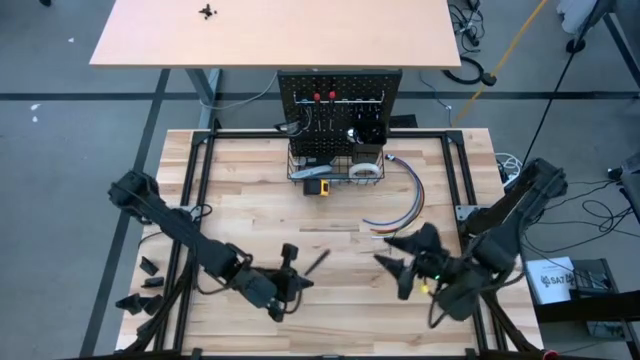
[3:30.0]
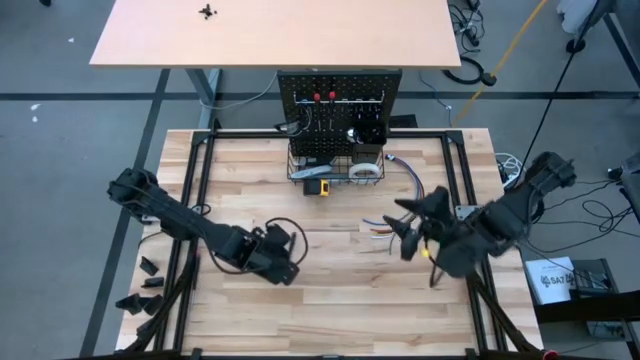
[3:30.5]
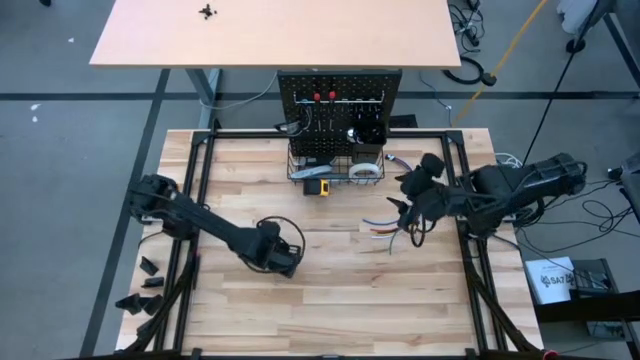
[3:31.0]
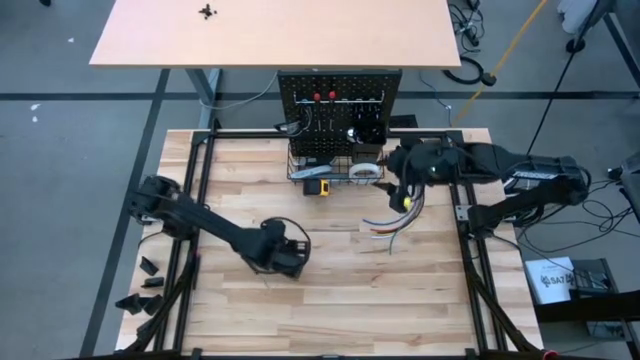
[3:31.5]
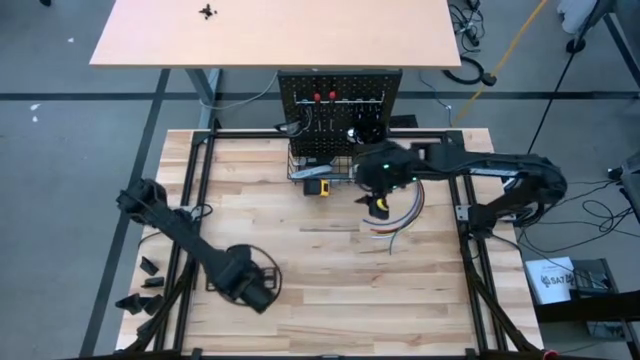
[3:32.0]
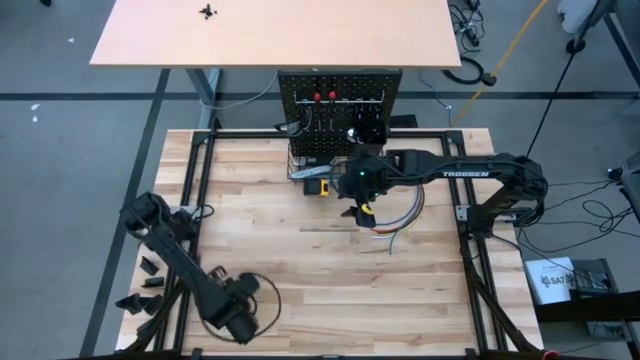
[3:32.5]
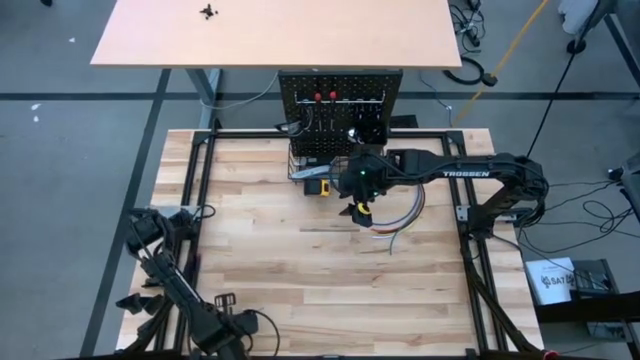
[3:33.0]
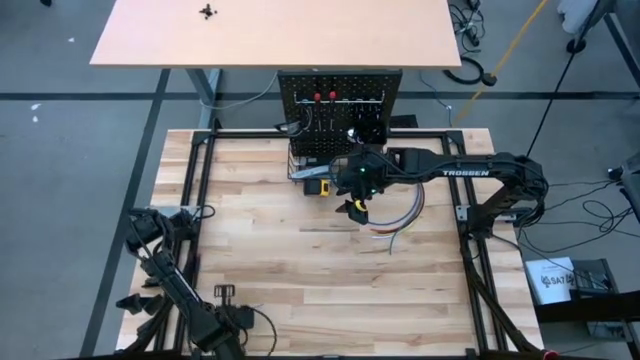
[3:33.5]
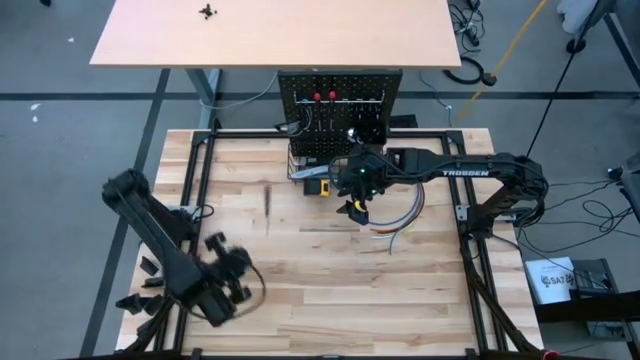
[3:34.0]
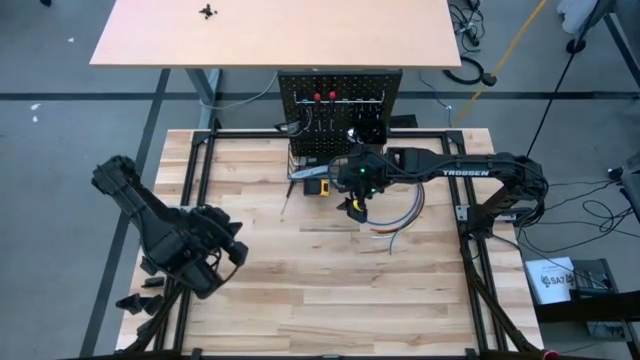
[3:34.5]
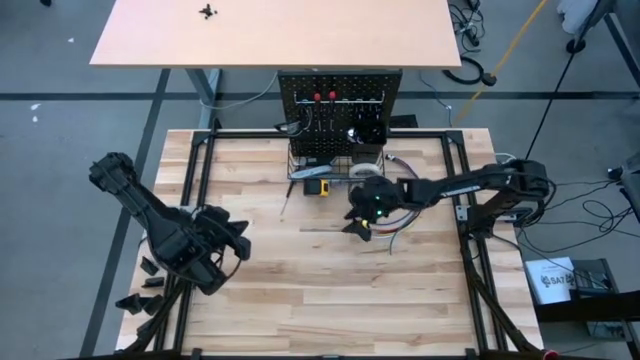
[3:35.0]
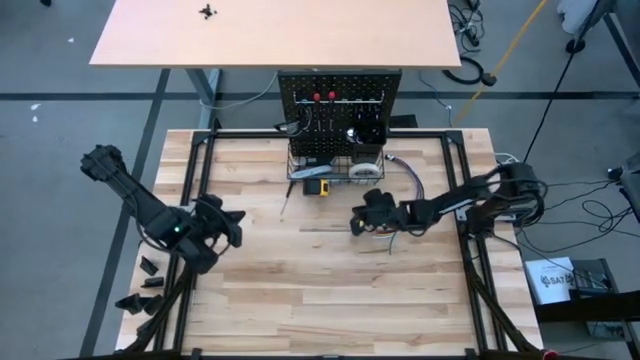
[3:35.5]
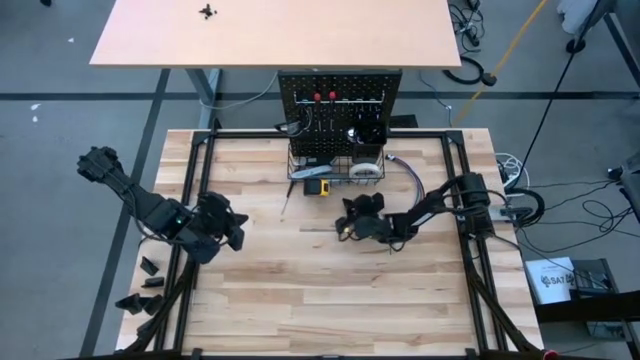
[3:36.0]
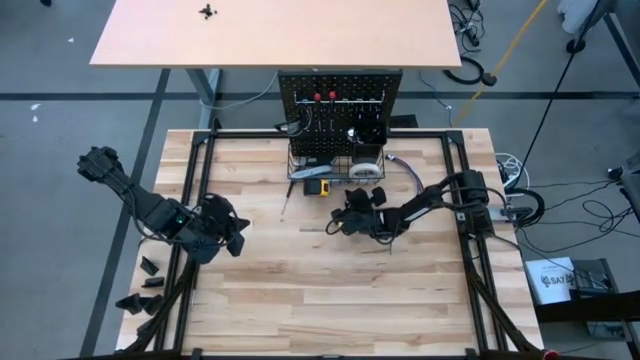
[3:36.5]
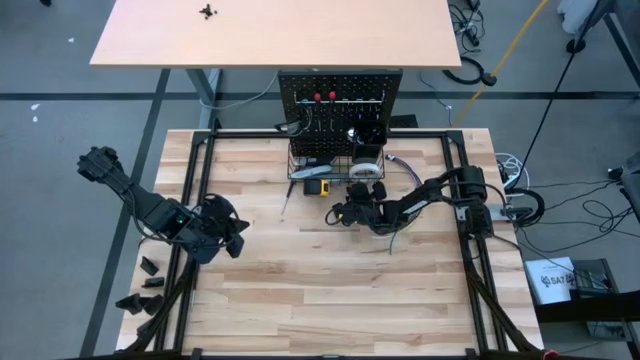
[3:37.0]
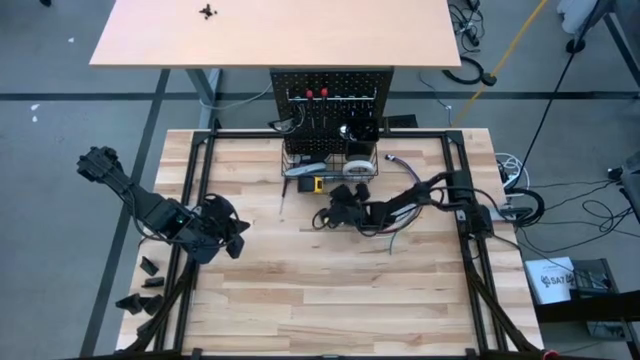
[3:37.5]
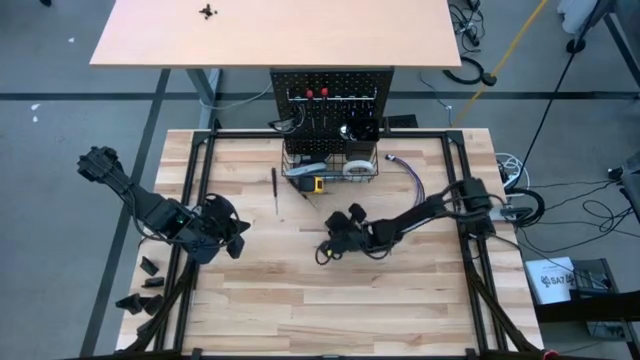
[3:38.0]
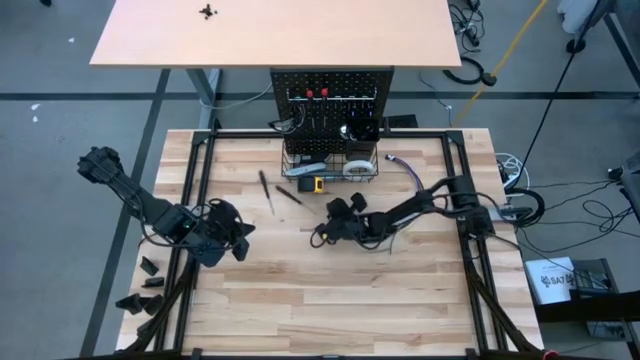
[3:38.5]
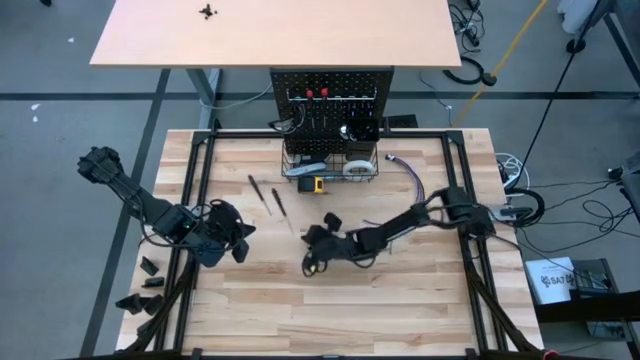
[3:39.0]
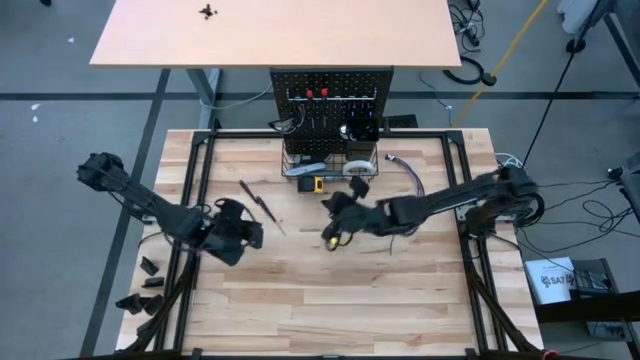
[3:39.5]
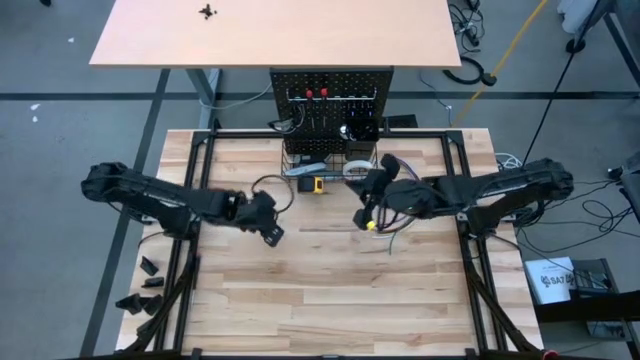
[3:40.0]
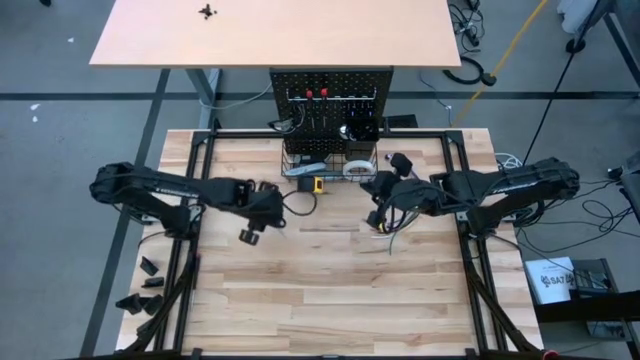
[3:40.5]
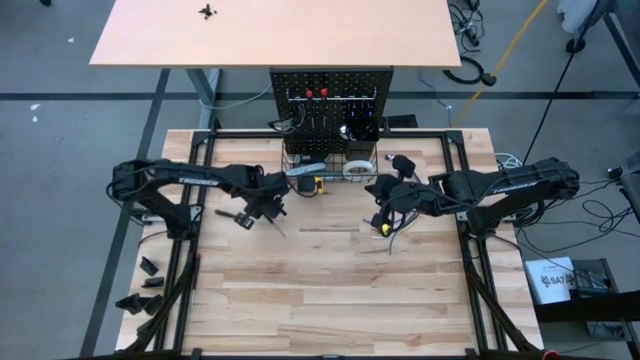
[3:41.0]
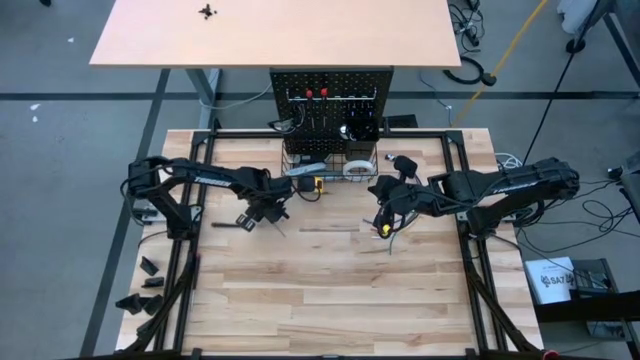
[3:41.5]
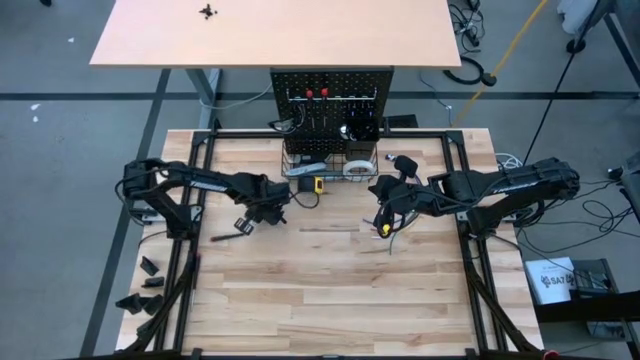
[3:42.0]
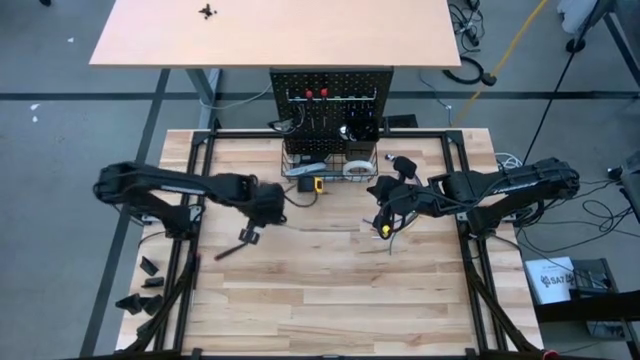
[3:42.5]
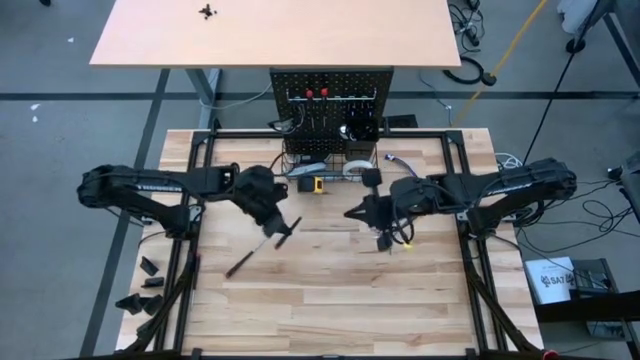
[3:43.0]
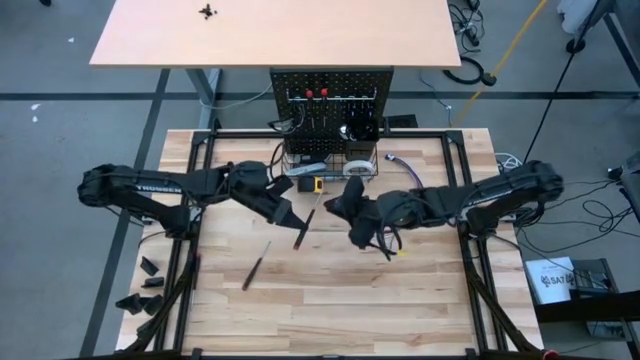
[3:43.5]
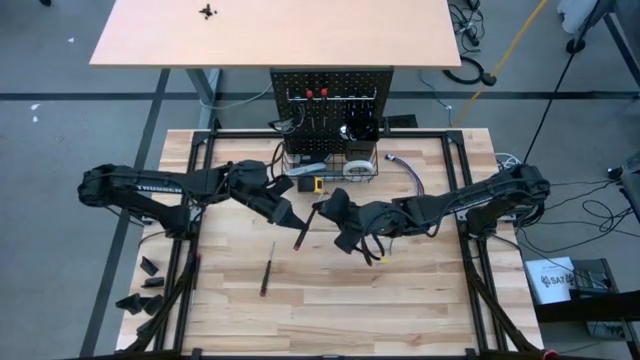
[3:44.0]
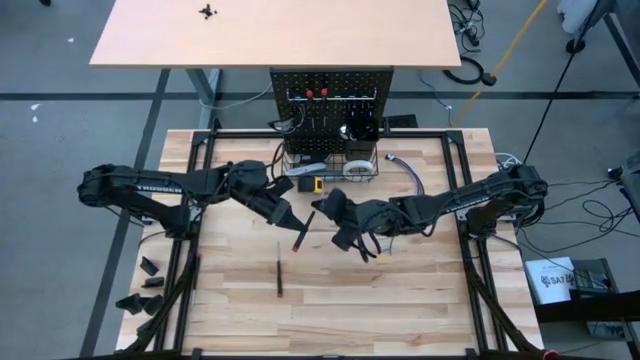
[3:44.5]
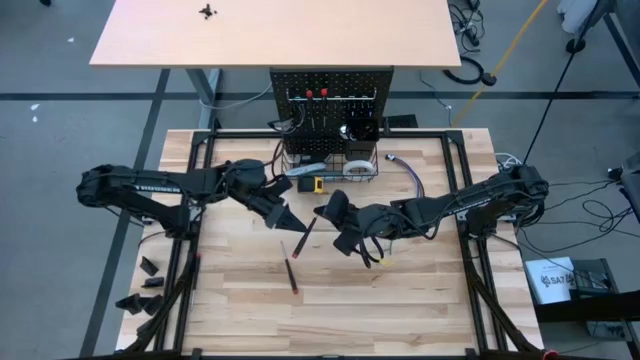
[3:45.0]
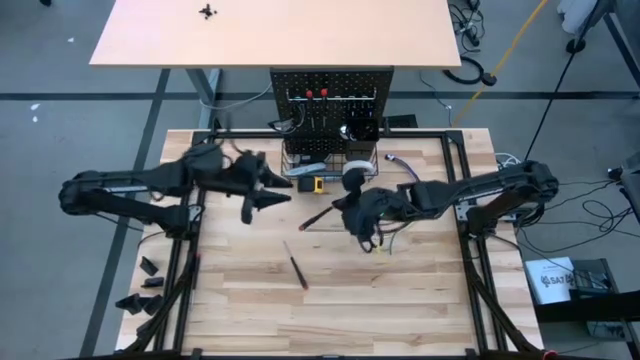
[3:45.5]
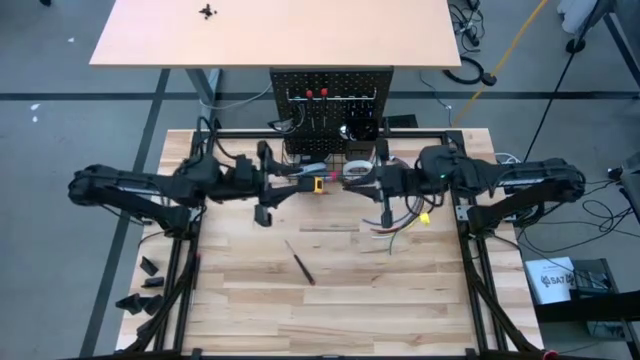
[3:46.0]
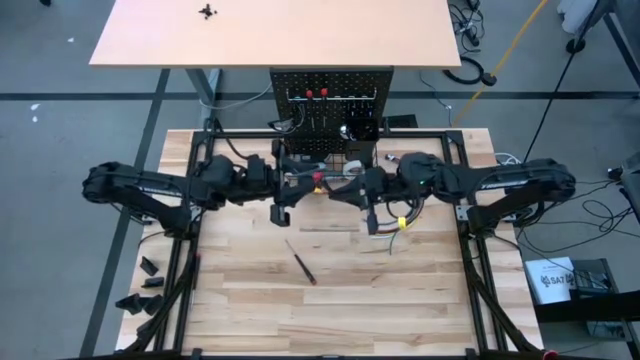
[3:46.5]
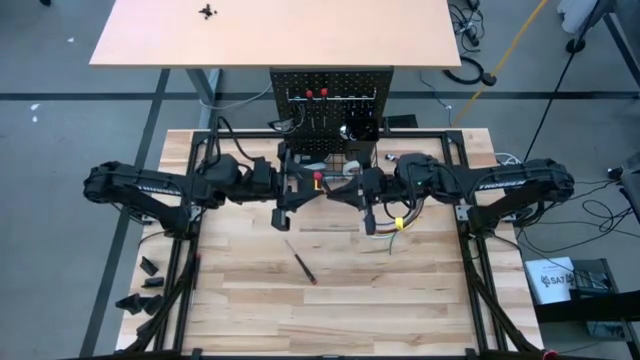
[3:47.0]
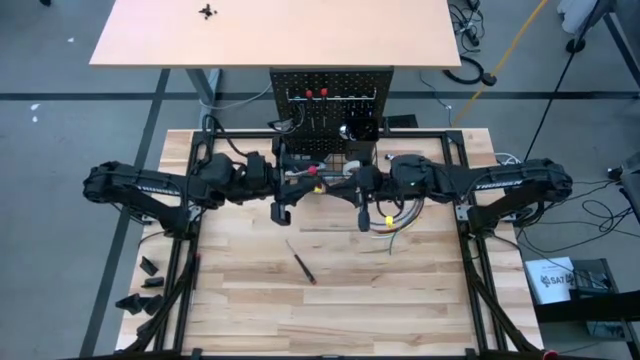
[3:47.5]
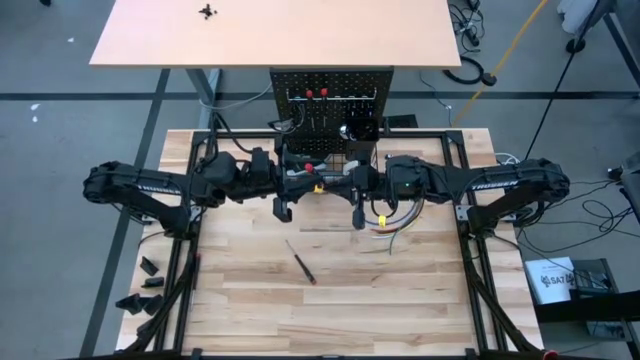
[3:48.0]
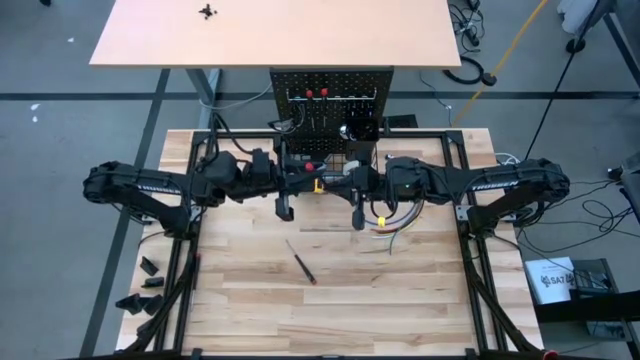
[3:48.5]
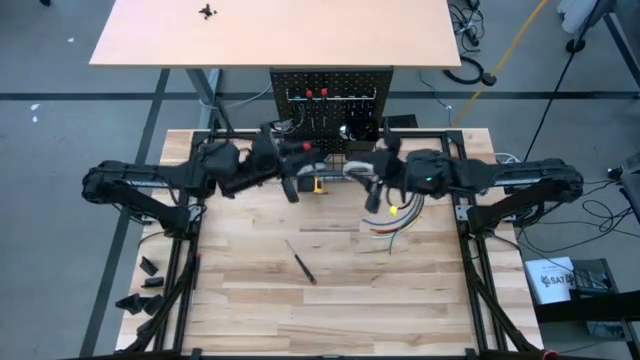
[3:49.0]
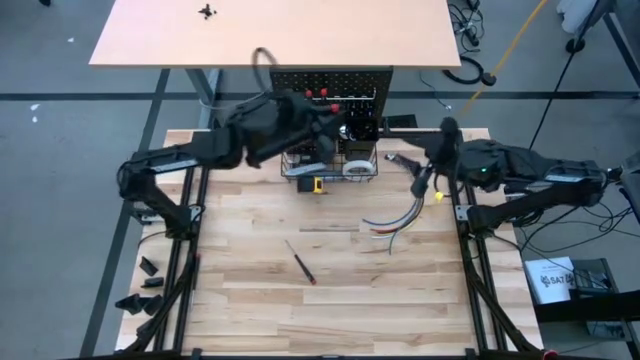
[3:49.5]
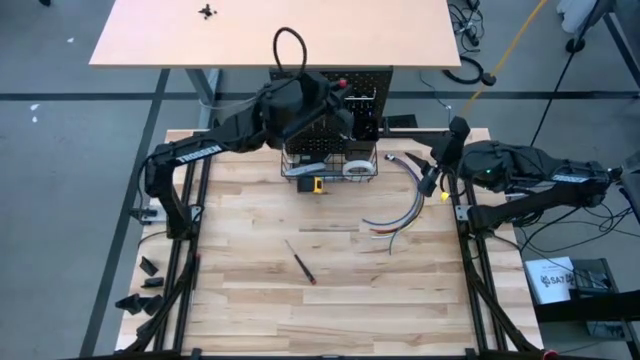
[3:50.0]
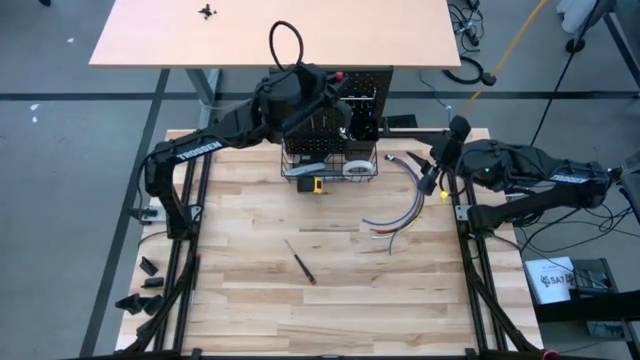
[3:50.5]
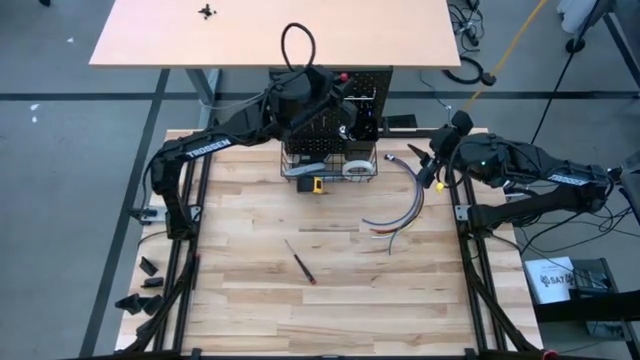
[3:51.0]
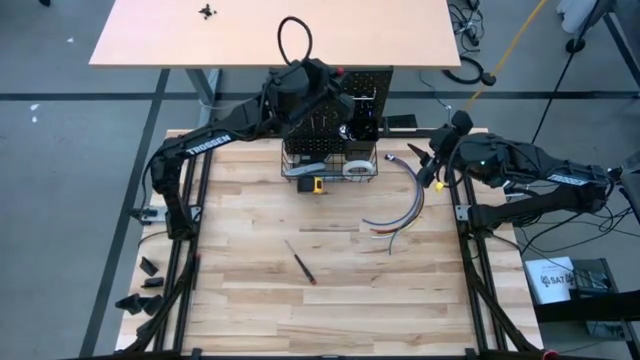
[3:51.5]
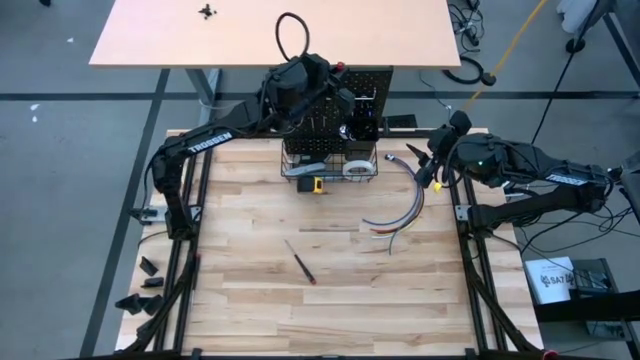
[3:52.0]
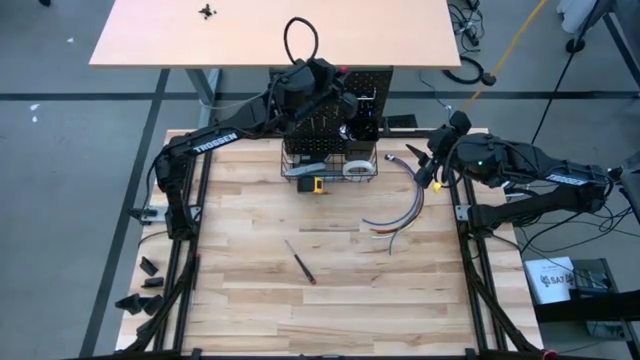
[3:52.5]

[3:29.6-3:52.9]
Task: Hang tools onto peg board
Hang the screwdriver on the pegboard
